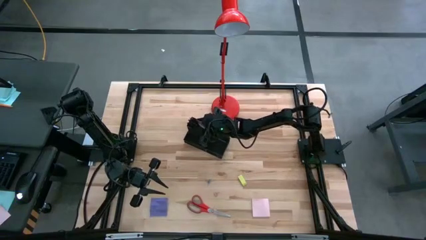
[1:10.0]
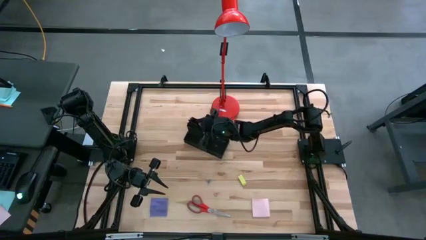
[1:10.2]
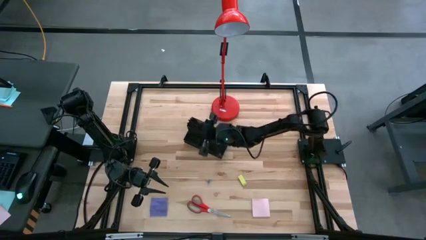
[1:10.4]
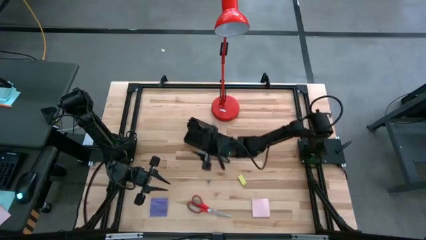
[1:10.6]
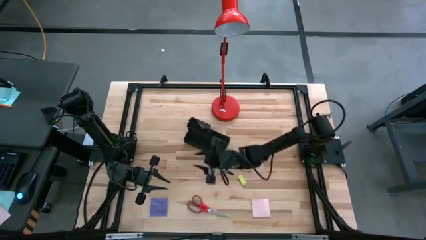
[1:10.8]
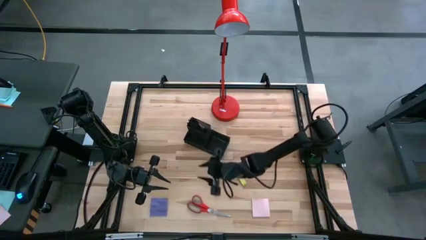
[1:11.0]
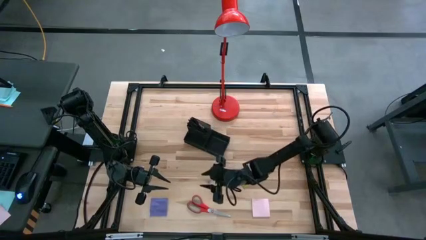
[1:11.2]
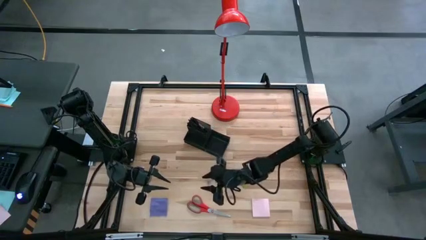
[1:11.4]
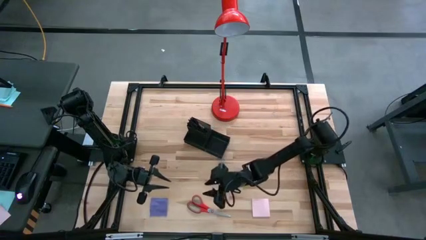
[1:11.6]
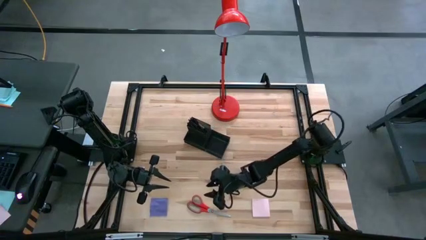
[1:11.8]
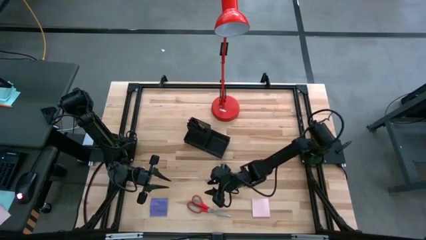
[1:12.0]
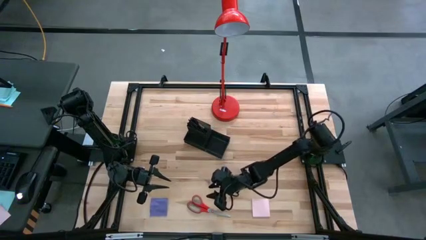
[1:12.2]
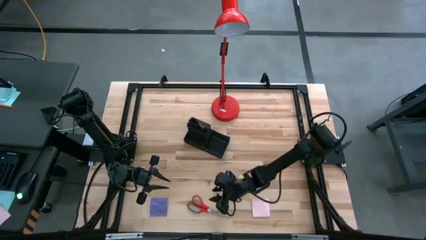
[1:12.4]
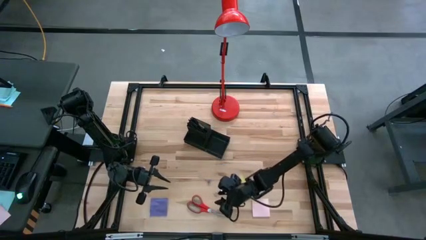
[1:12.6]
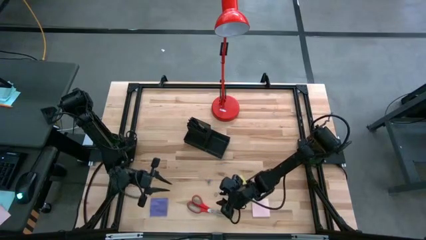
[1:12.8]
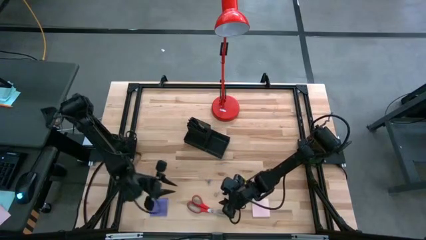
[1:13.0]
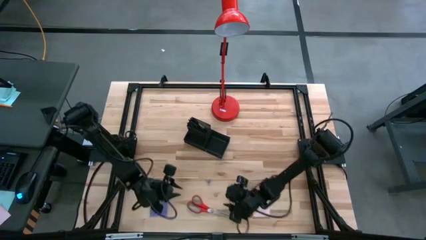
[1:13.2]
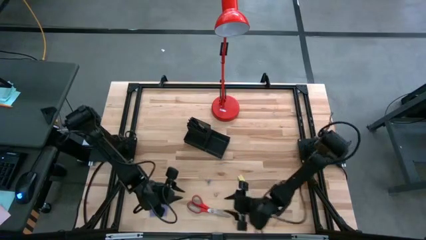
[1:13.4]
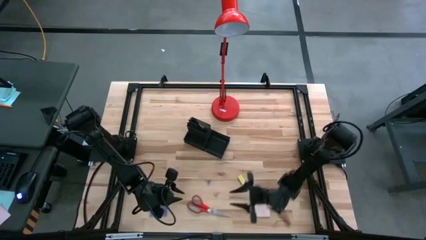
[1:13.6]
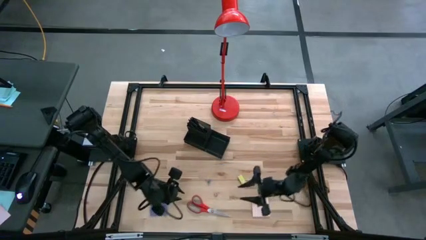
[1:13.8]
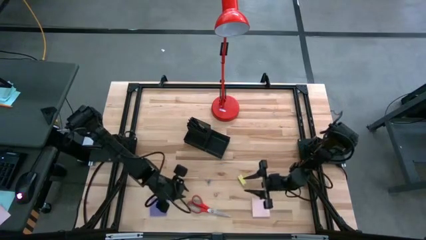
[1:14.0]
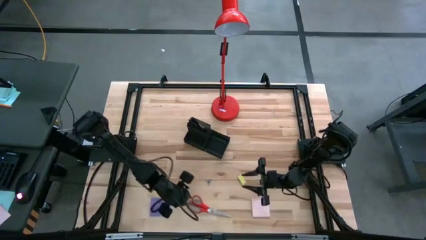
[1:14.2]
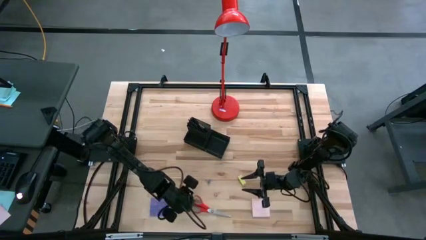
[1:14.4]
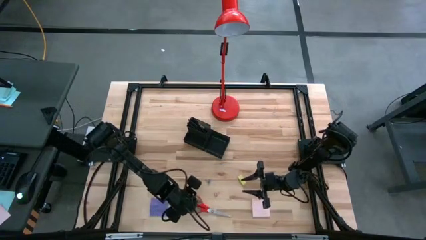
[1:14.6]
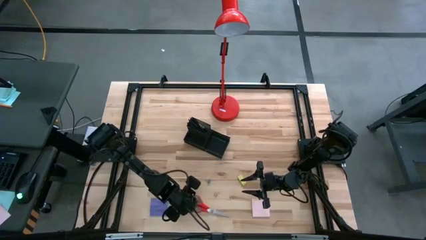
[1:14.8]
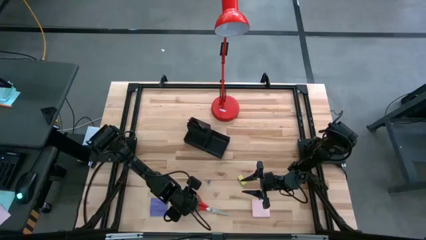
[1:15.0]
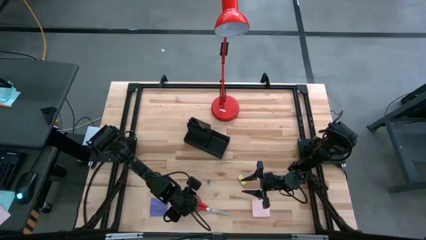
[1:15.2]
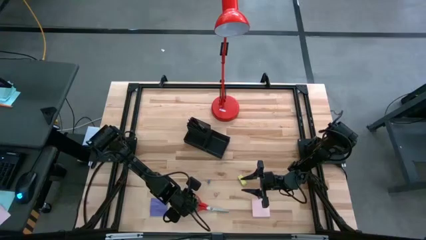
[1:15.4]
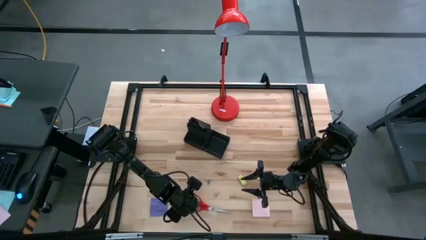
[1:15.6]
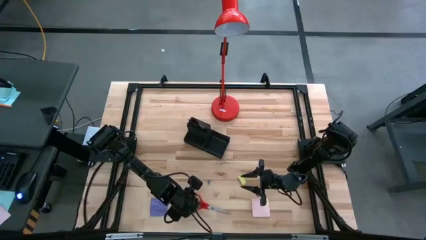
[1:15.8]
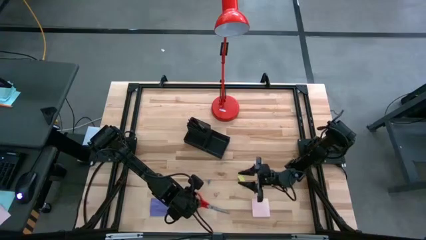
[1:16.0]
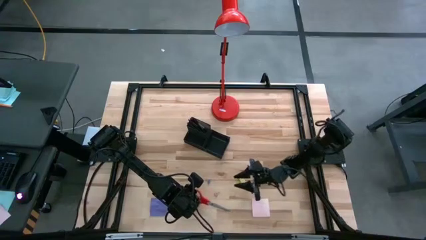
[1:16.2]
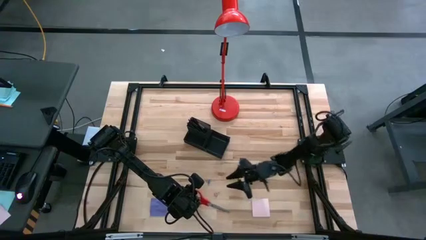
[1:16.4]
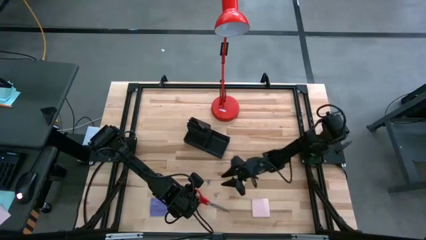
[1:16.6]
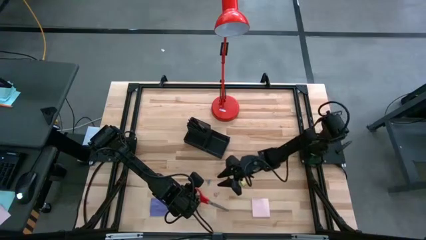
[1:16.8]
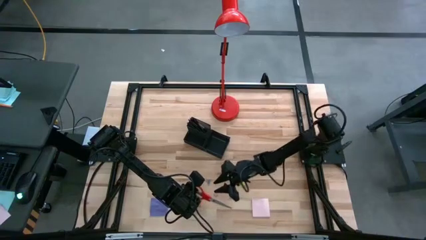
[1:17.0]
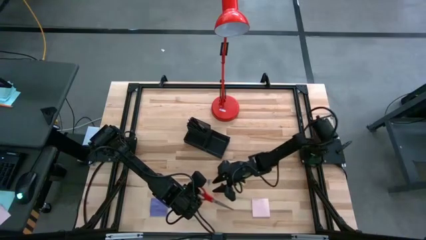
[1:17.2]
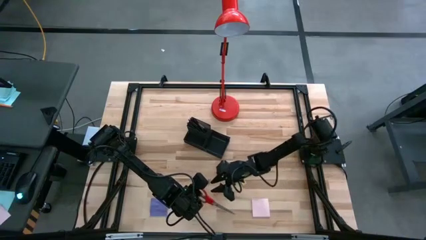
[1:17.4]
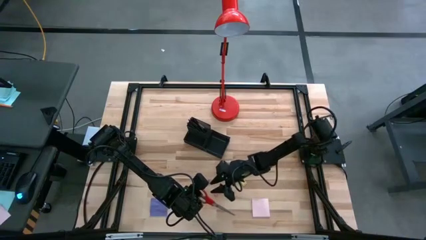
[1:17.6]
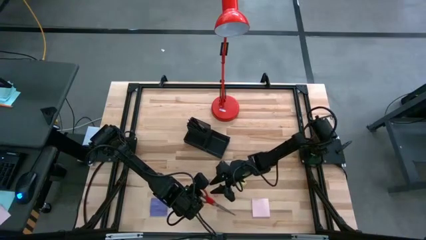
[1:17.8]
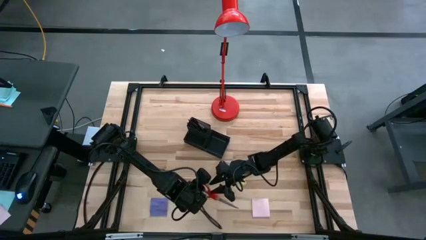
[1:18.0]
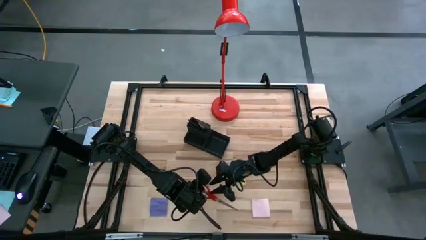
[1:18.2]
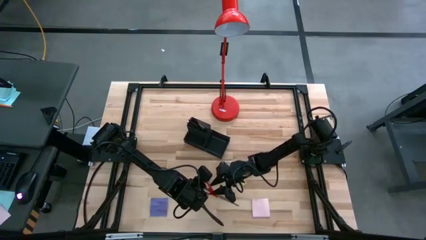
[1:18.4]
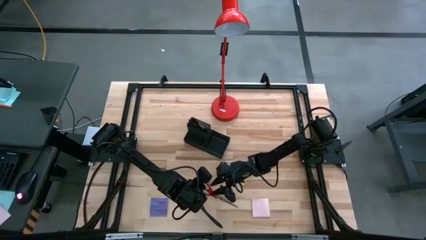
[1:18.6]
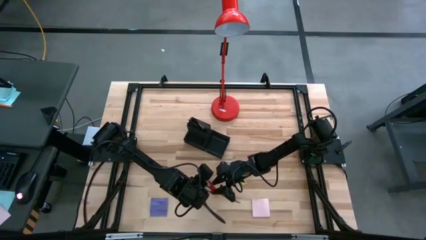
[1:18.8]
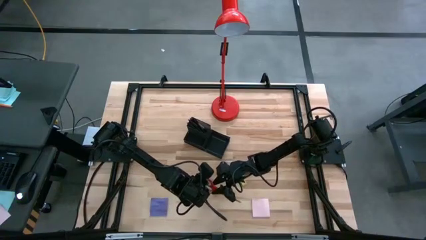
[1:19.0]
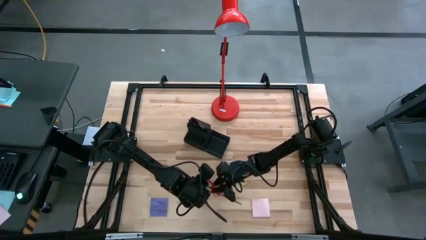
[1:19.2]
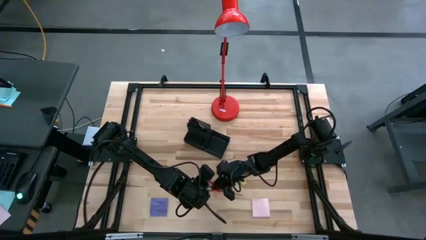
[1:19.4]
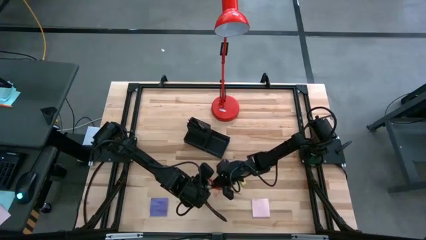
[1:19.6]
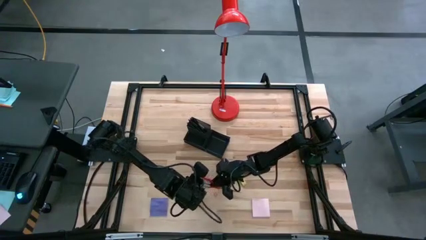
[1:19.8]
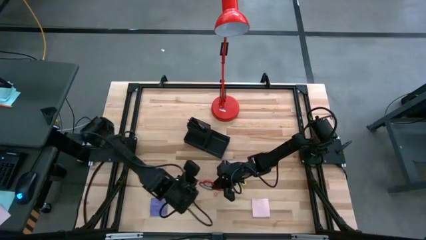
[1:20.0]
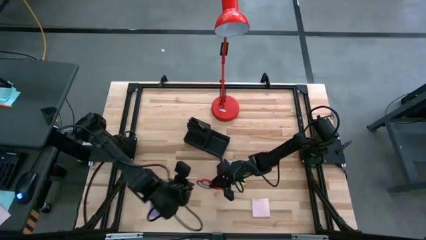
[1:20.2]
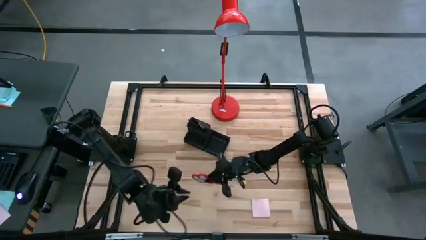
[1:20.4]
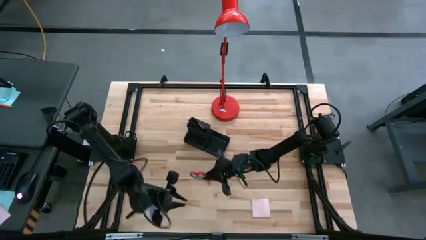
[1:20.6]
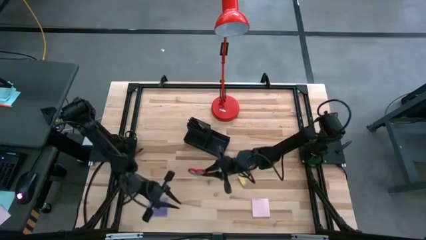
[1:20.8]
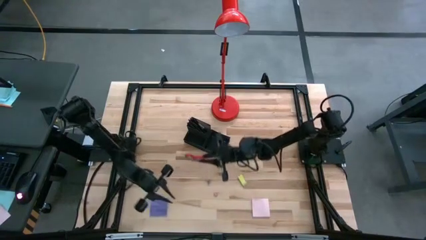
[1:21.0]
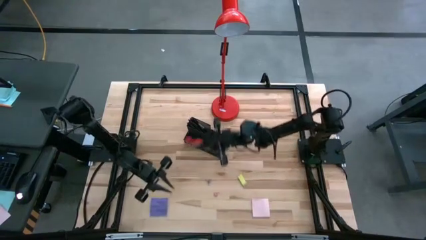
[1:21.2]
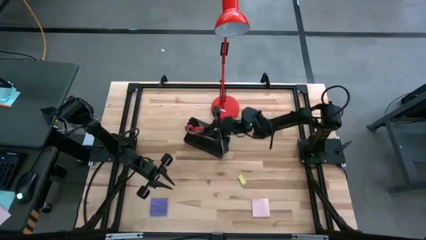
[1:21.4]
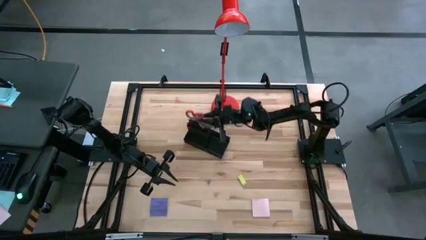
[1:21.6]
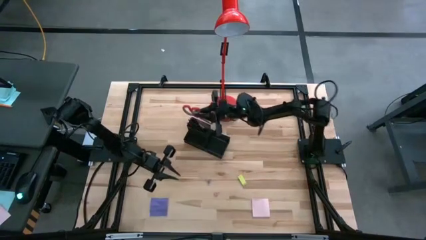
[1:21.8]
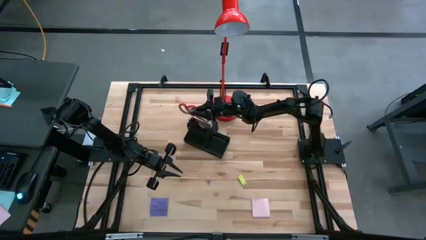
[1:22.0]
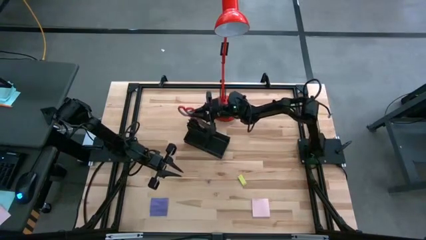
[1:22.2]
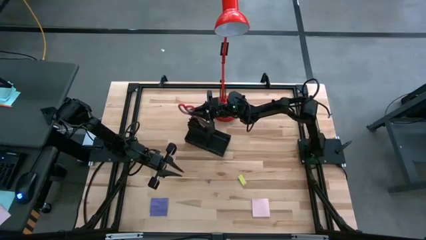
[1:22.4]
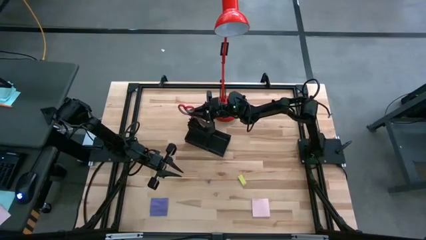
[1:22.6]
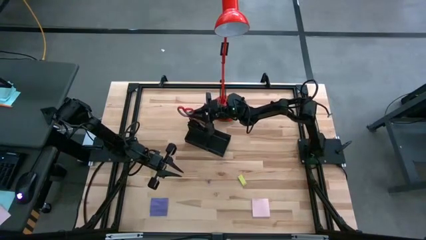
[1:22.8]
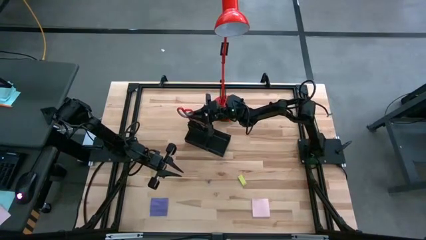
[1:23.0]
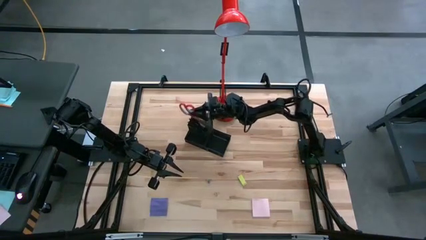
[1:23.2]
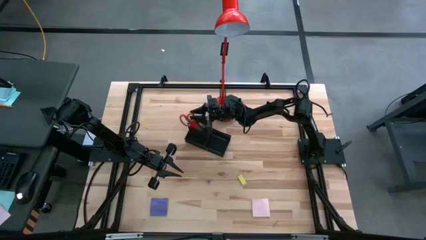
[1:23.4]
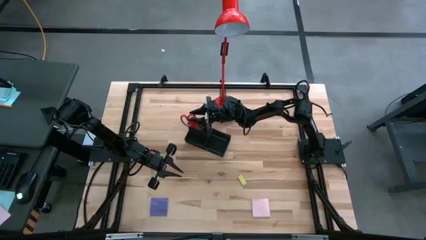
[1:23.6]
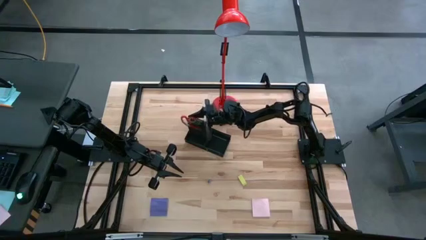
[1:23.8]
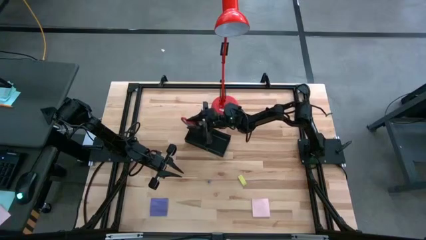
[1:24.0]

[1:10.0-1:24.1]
Task: Pick and place office supplies into organizer
Put the orange scissors into the desk organizer

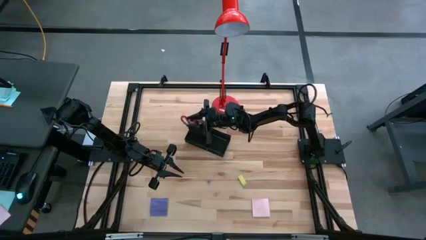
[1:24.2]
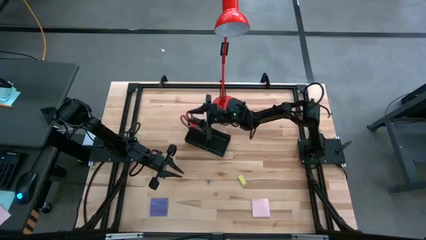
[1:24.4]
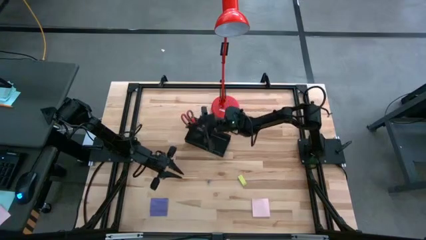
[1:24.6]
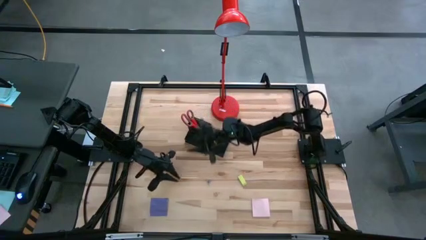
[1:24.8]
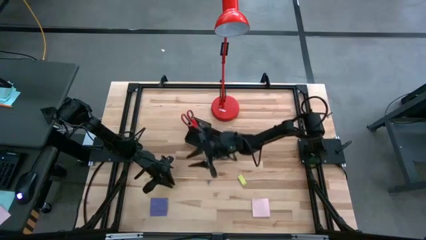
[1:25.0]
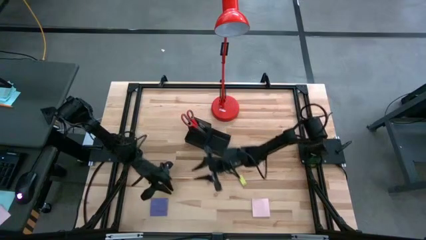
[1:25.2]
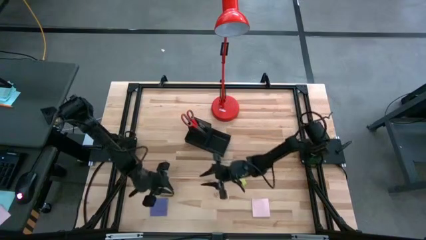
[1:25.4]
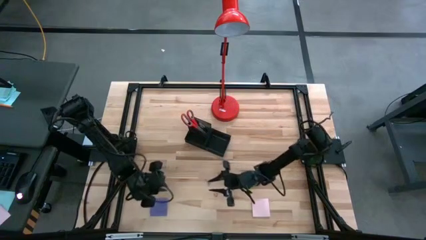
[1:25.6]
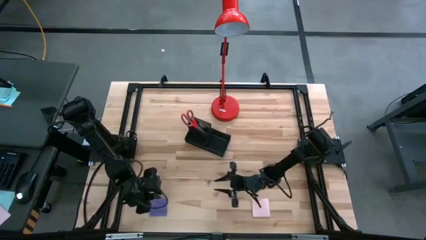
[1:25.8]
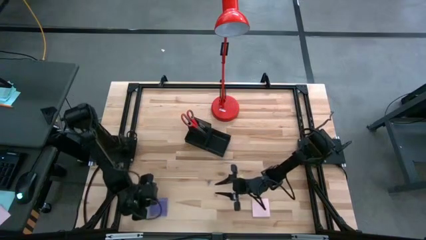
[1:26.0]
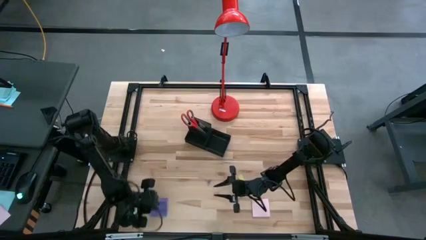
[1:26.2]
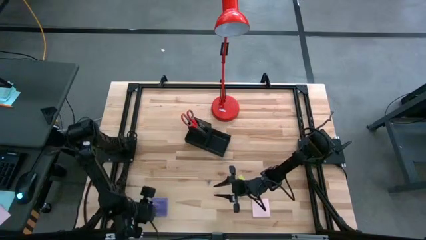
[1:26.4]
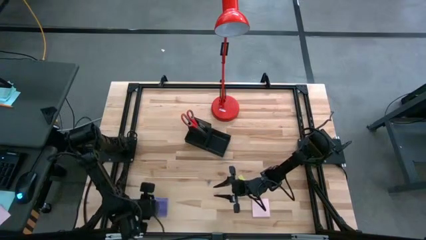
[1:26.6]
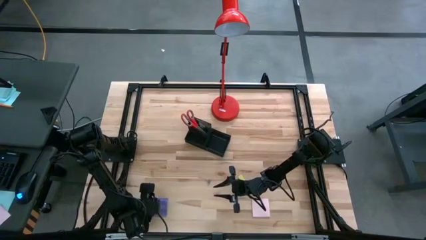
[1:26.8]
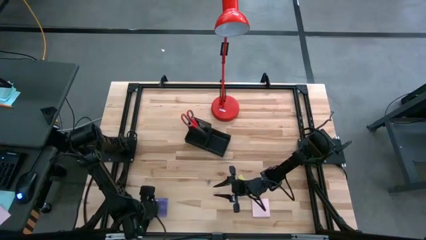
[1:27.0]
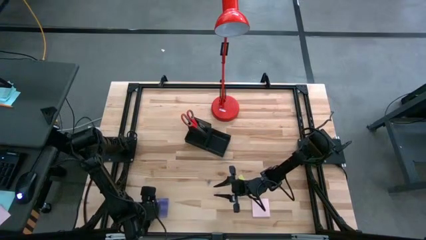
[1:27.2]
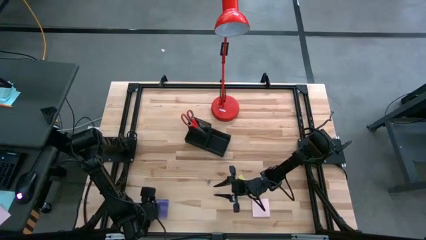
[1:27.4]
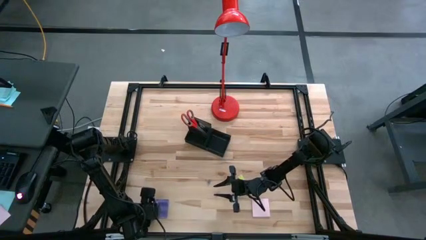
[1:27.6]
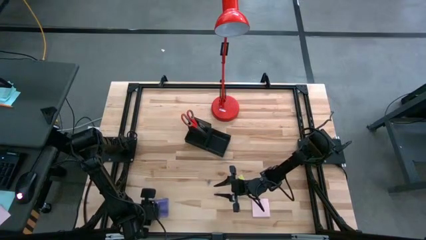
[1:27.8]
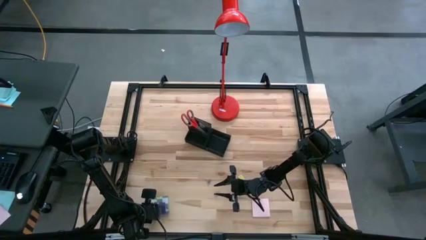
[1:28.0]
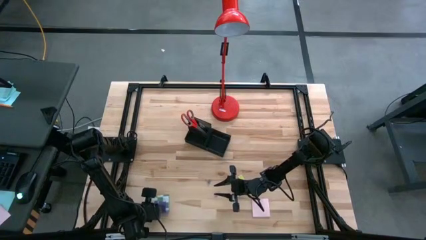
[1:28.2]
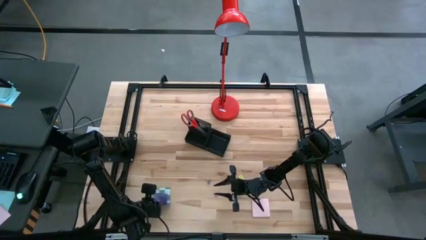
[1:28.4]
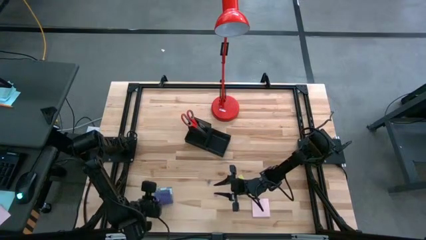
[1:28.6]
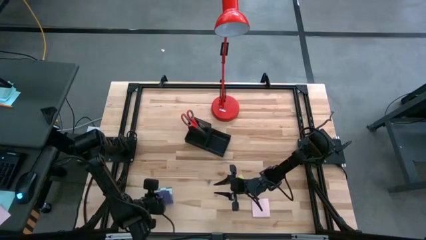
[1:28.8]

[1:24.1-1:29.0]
Put the purple sticky note into the desk organizer
